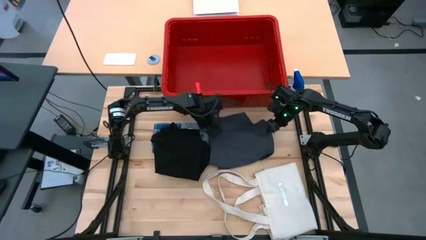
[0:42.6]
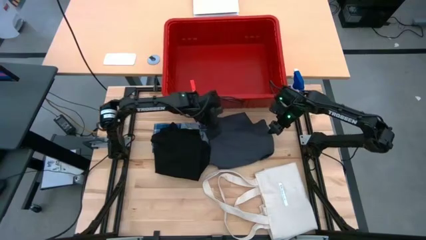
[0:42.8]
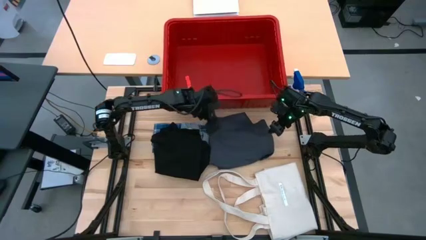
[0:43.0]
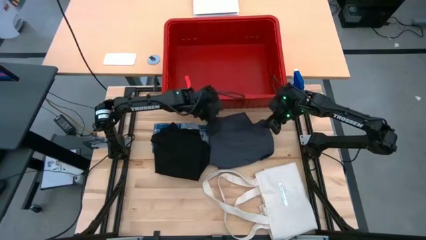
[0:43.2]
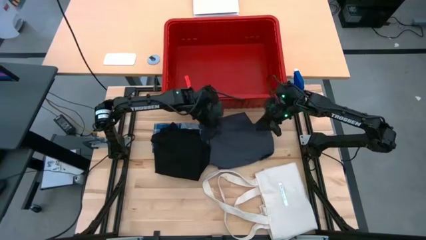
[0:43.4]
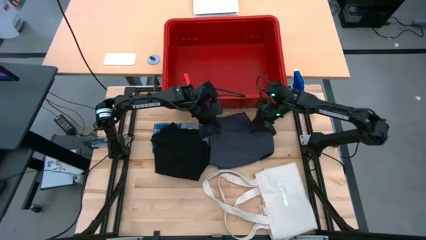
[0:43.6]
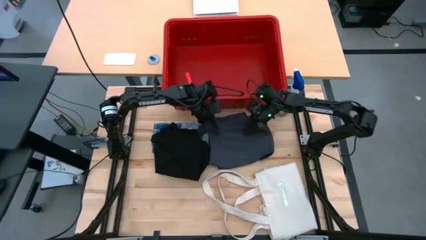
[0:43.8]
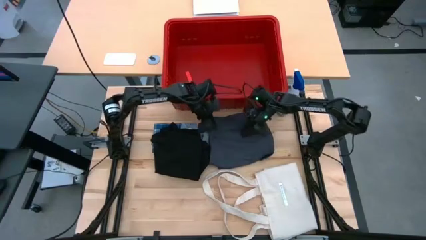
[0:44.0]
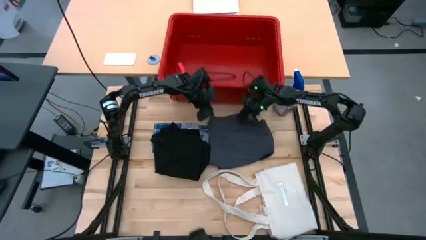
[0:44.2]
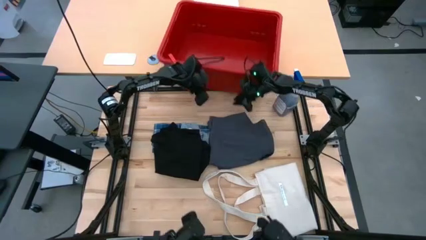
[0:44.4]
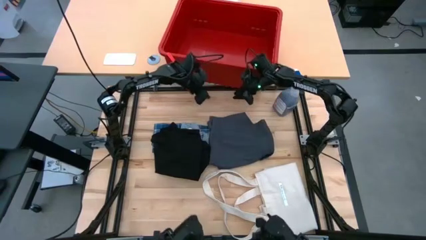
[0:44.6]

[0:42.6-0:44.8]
Task: Fold laundry
Adjust the red organizer bin

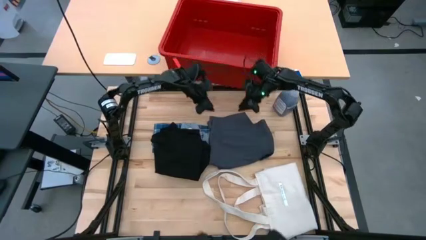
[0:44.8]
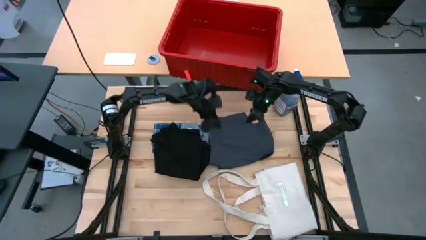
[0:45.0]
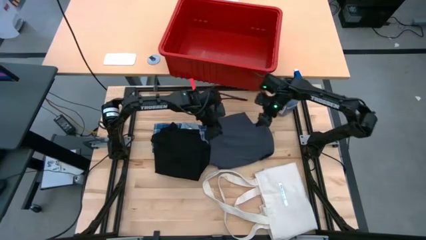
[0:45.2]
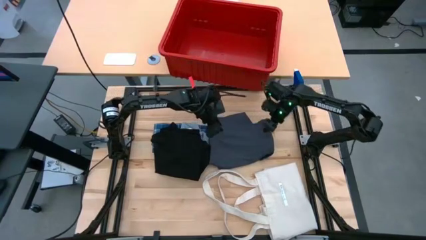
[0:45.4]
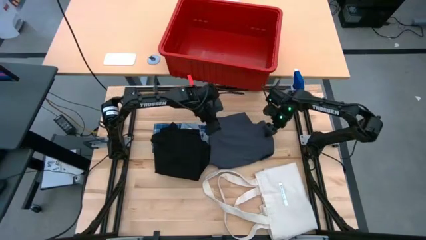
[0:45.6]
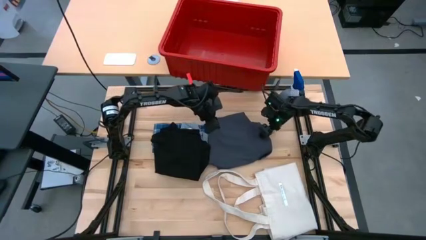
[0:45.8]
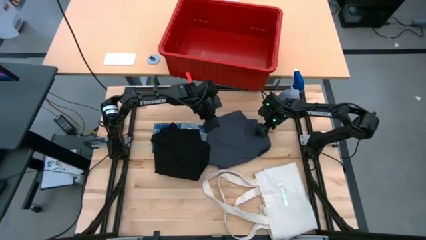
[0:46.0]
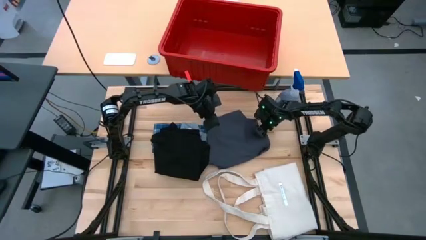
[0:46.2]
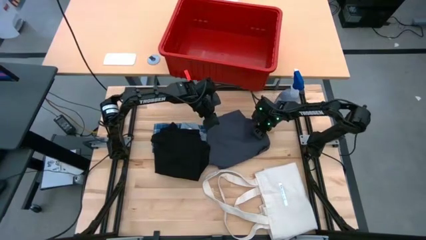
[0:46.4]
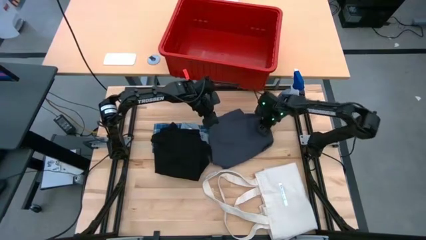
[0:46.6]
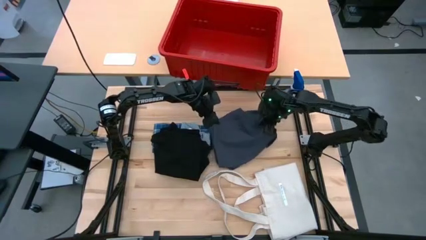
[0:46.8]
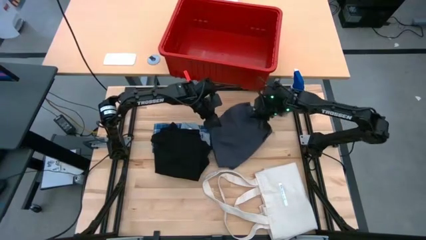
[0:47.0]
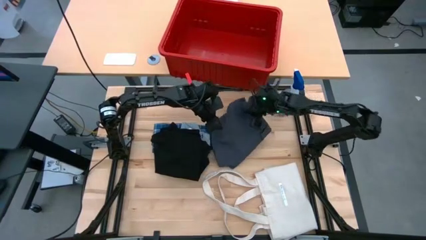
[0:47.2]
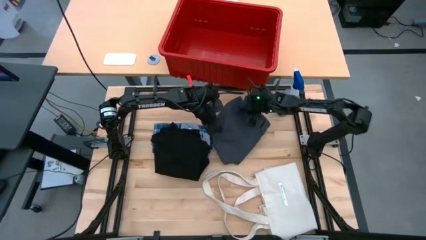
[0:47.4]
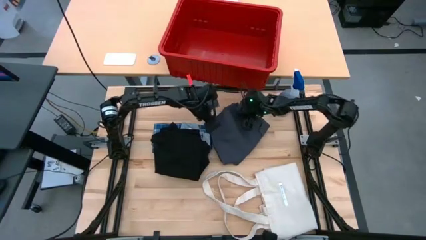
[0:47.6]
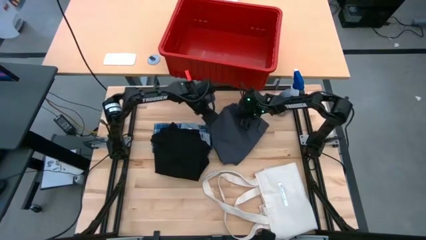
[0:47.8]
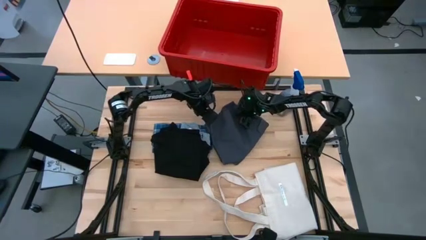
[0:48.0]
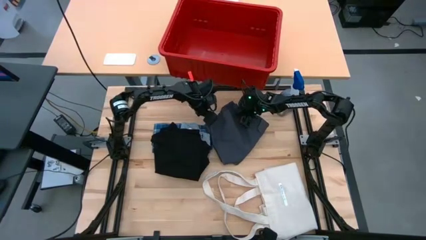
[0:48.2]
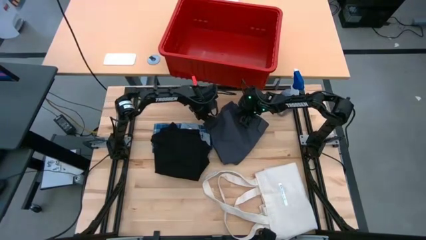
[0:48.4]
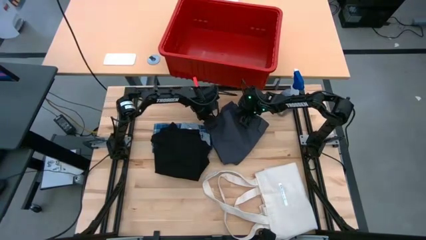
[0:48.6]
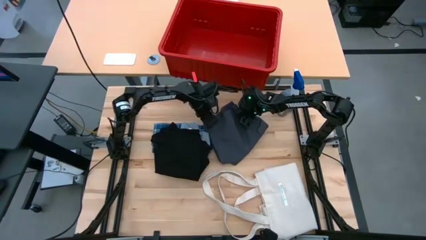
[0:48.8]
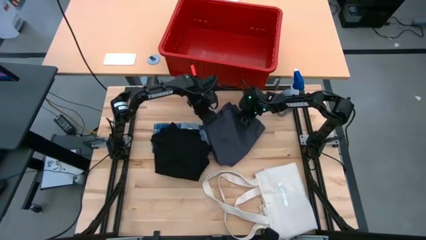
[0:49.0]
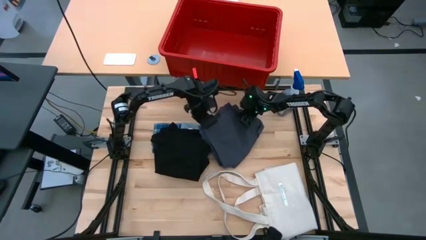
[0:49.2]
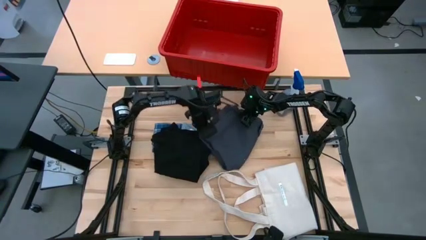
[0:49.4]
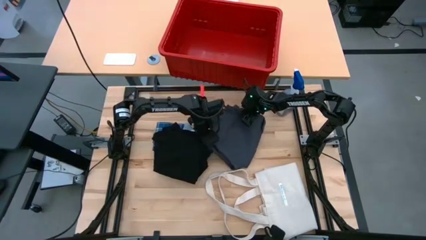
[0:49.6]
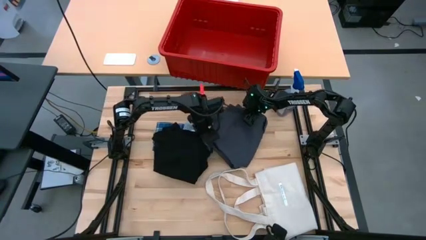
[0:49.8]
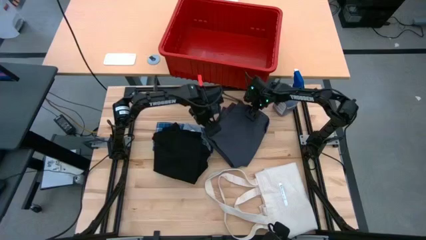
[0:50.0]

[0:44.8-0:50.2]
Adjust the dark blue shirt

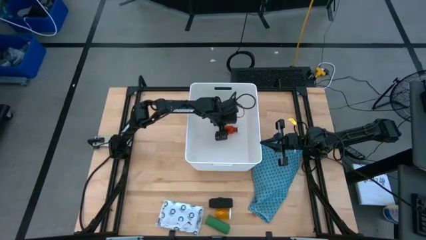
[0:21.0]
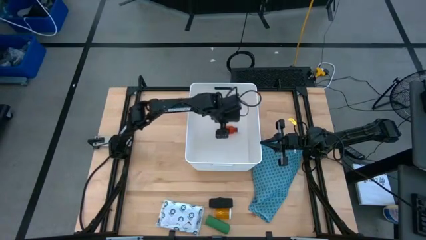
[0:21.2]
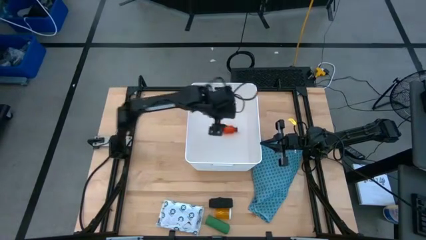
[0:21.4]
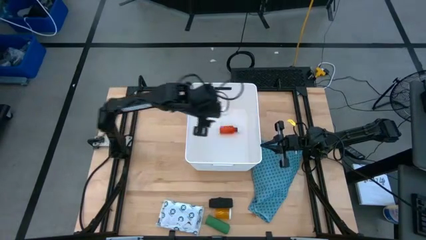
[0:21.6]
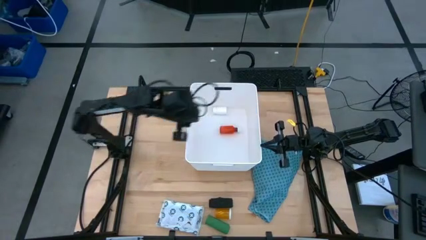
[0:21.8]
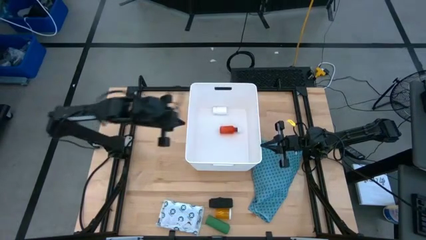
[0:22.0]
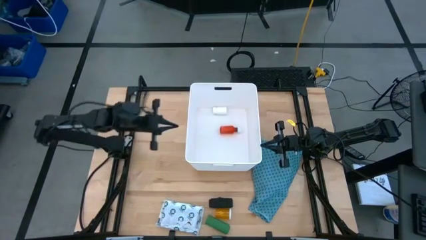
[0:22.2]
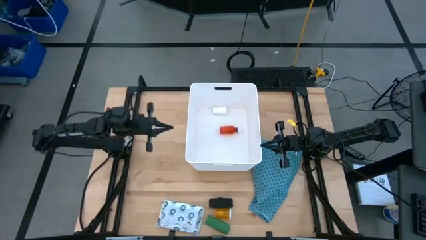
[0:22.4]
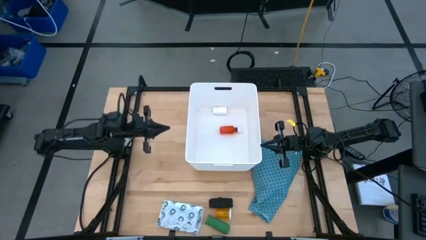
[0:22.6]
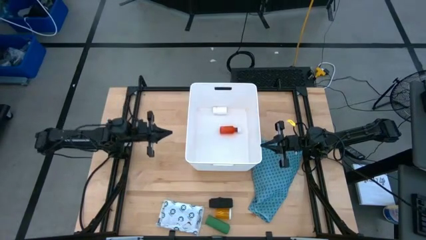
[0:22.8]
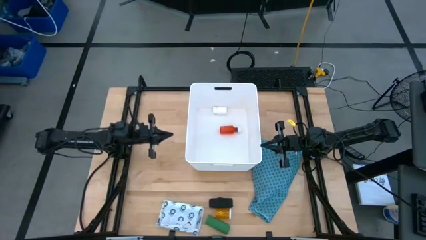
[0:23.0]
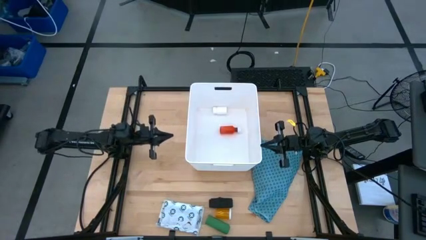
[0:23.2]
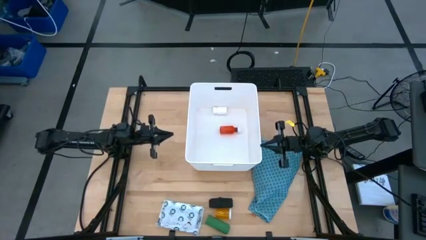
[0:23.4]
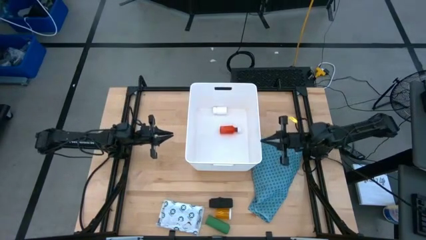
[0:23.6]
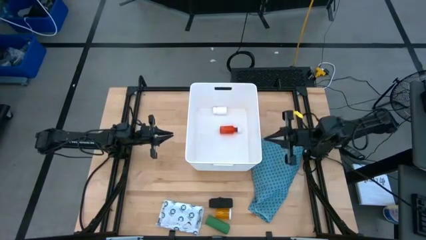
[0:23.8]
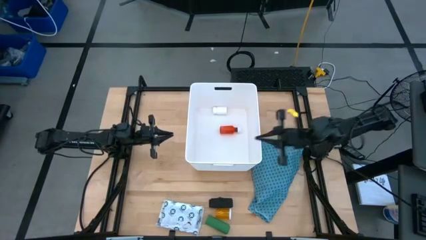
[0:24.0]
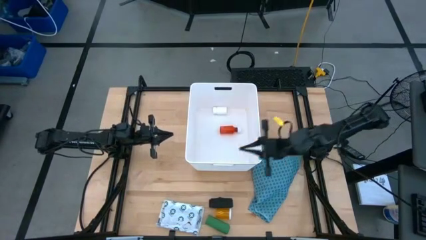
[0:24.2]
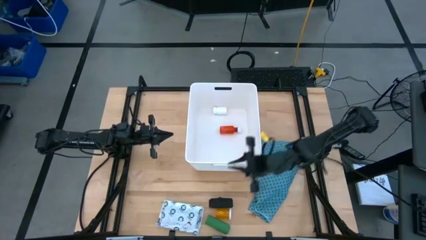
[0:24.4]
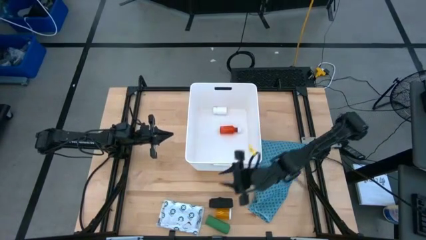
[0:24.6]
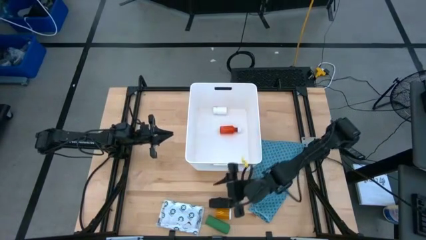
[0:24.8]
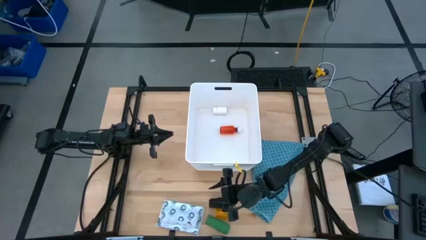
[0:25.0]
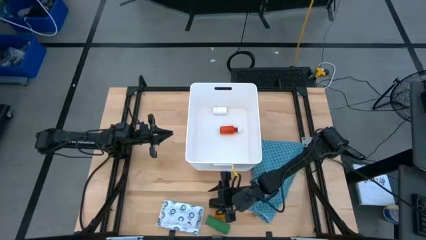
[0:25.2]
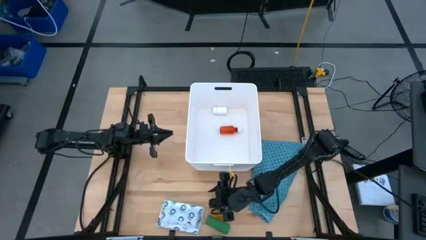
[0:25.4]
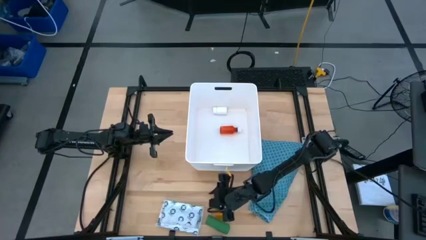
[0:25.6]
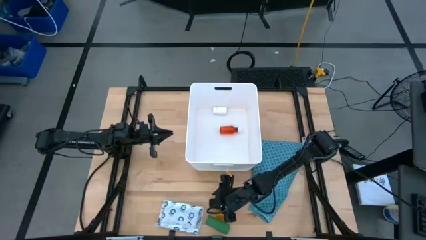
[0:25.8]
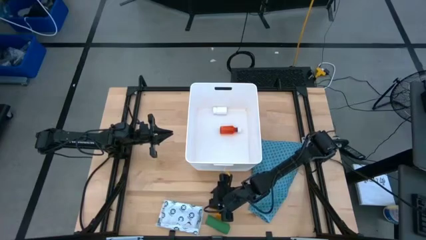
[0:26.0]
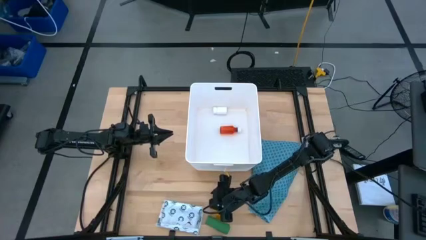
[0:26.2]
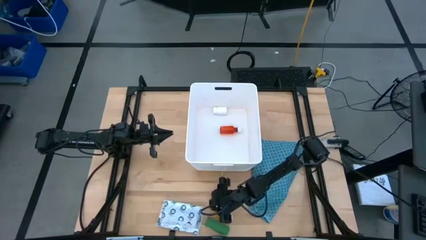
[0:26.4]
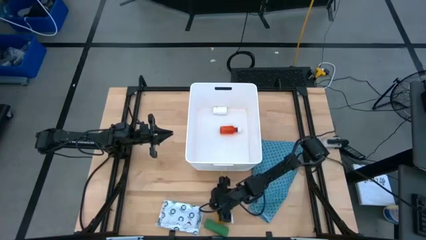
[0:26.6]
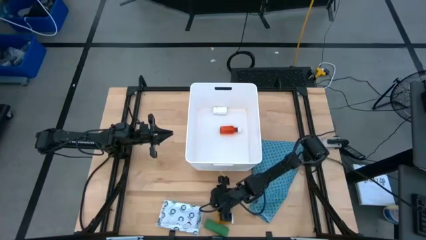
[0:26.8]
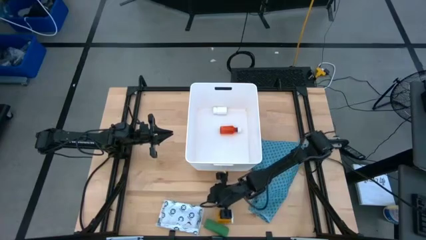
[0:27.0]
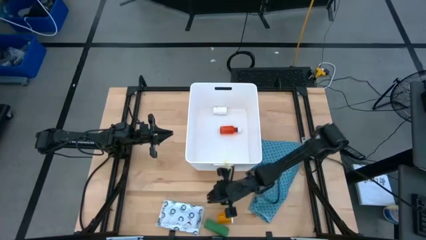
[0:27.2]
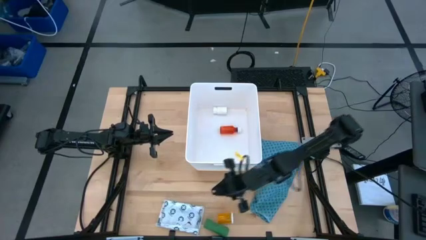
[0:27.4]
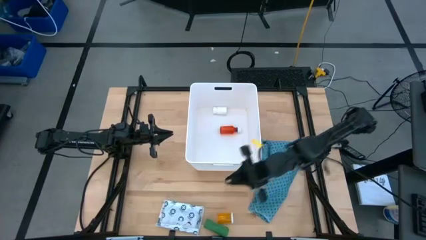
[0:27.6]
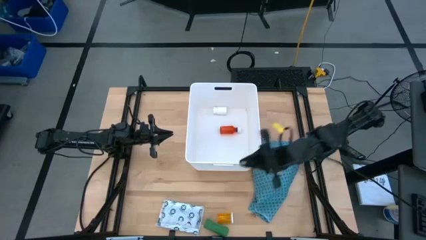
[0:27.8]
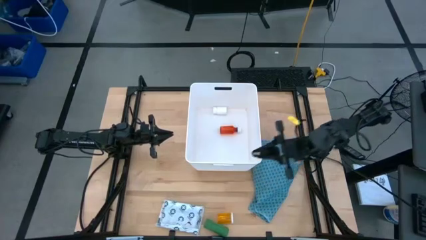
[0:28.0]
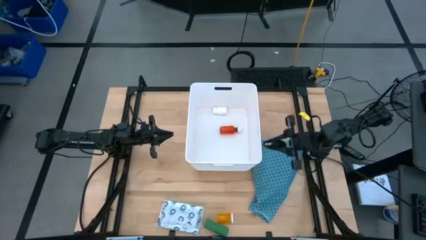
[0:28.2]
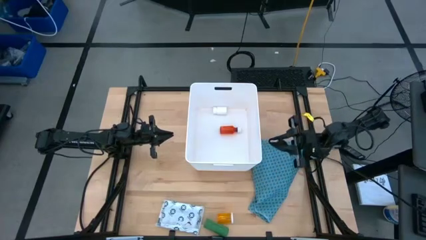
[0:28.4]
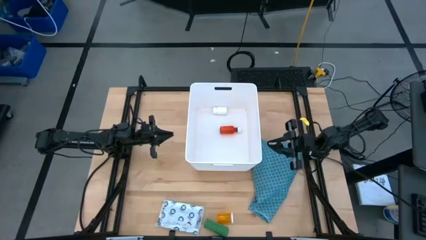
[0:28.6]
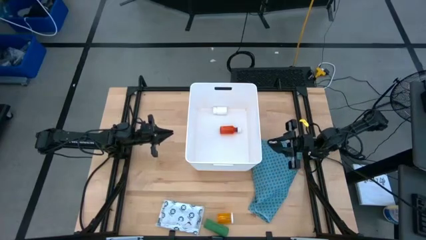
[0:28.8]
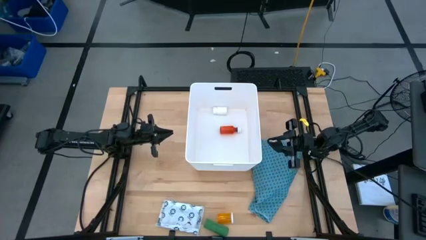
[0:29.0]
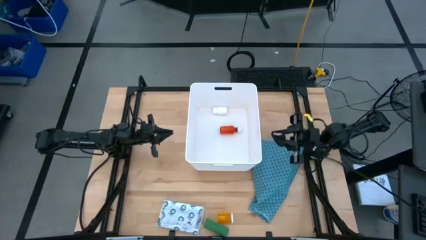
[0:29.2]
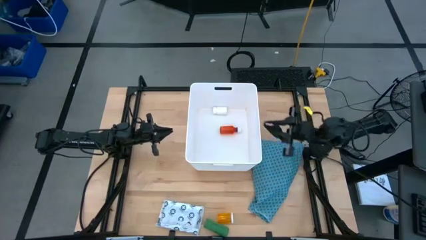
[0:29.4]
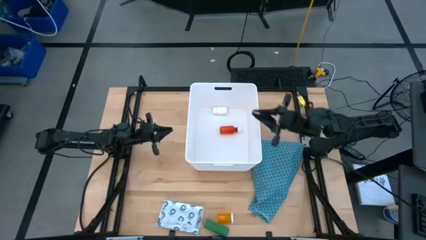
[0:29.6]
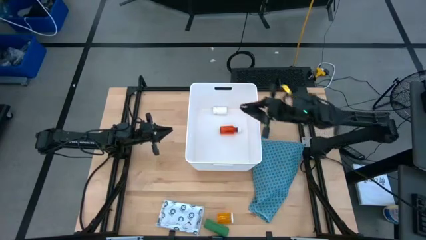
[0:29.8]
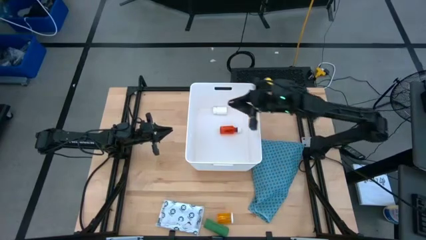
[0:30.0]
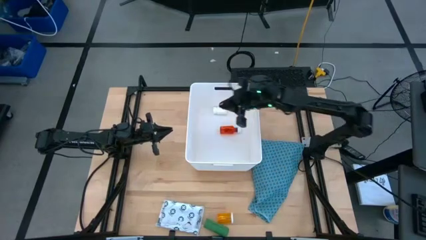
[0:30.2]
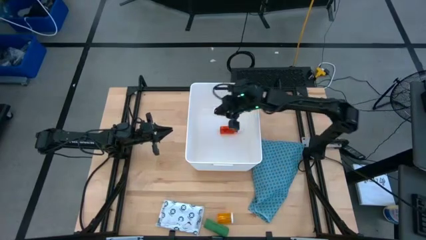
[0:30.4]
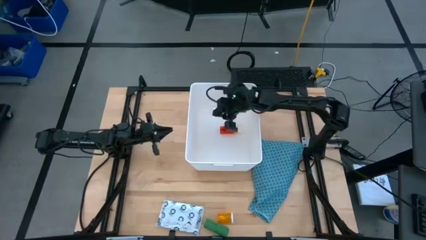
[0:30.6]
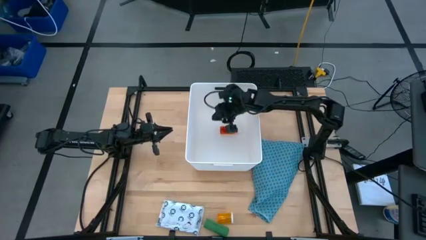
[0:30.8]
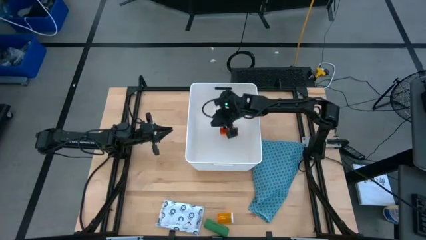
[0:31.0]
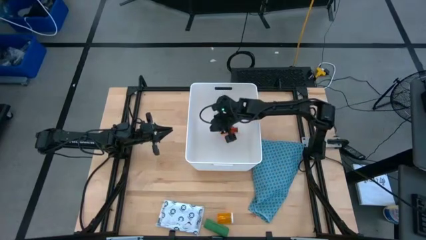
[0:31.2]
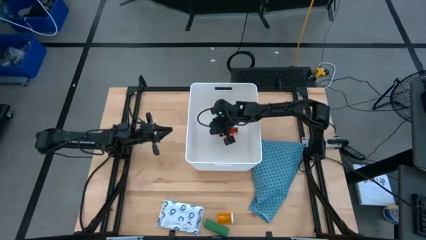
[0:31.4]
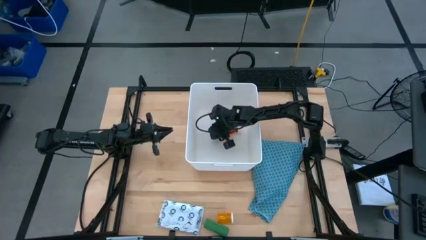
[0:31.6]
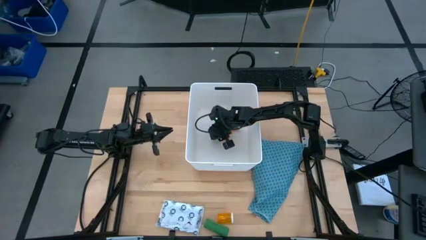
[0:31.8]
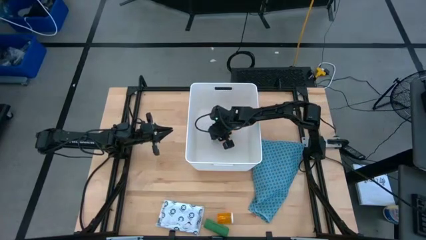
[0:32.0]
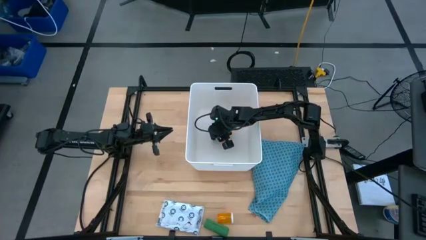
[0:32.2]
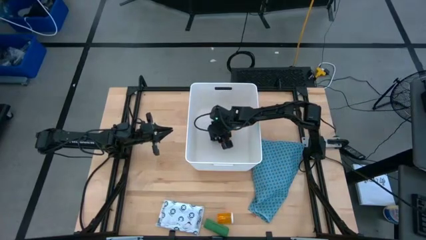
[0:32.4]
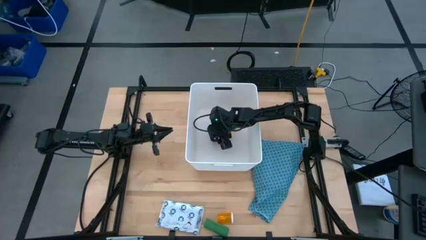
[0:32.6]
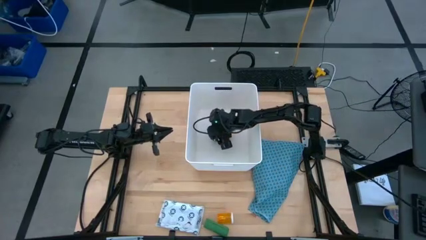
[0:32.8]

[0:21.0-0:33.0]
Task: Pick & place medical supplies in basket/bin
Put the black bandage into the white bin
